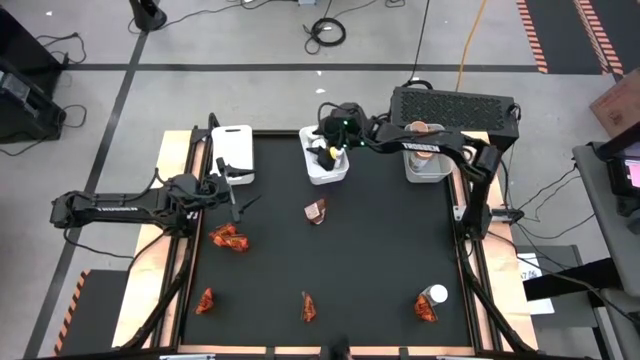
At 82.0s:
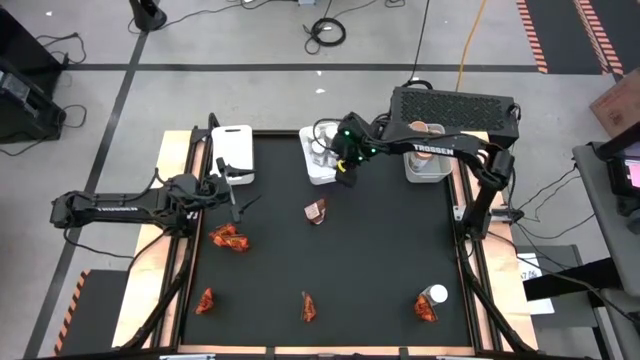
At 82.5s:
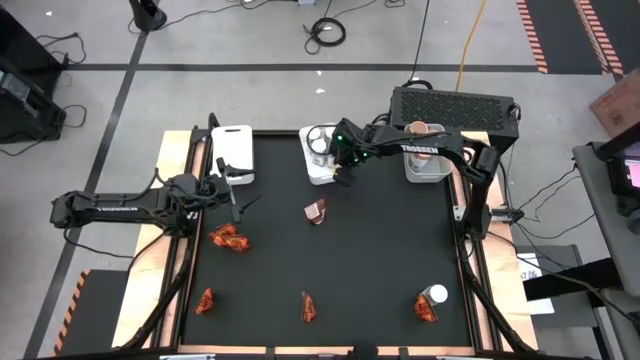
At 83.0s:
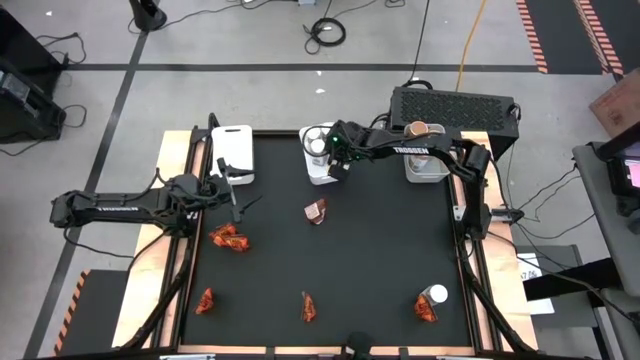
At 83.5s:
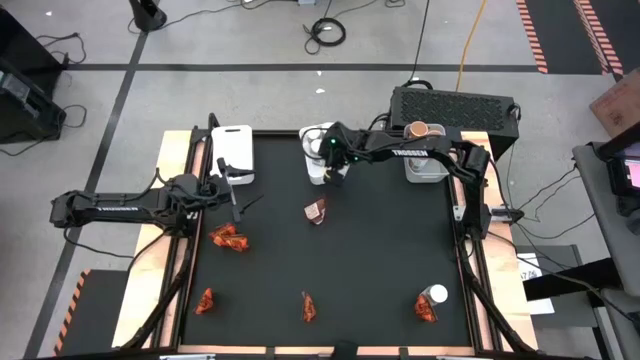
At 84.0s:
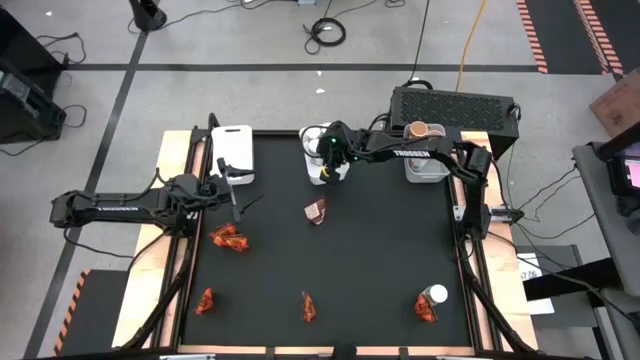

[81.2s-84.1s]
Task: Sort spices by type
Adjust the white seasoning bottles

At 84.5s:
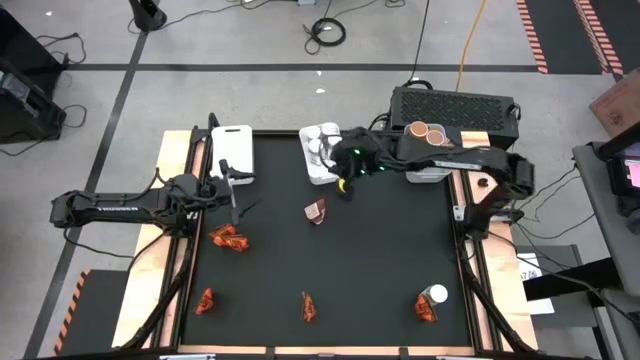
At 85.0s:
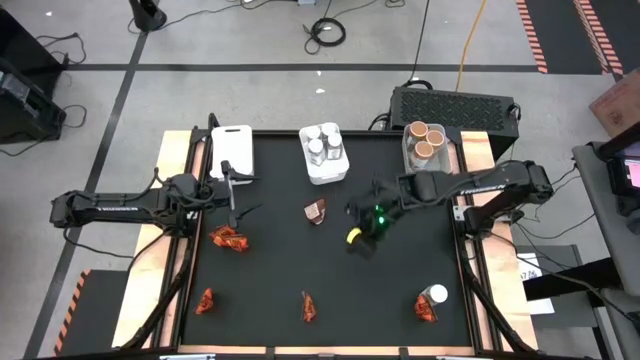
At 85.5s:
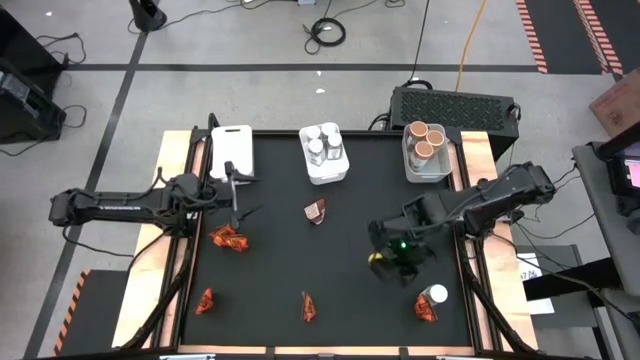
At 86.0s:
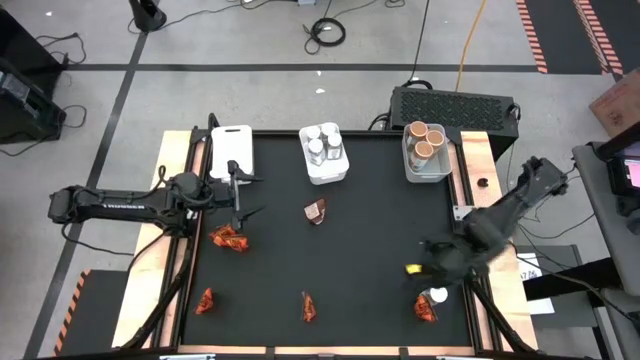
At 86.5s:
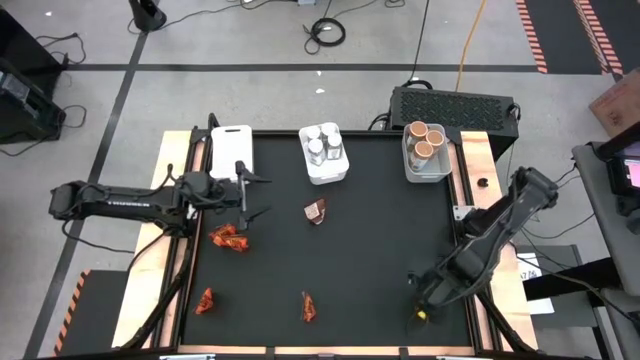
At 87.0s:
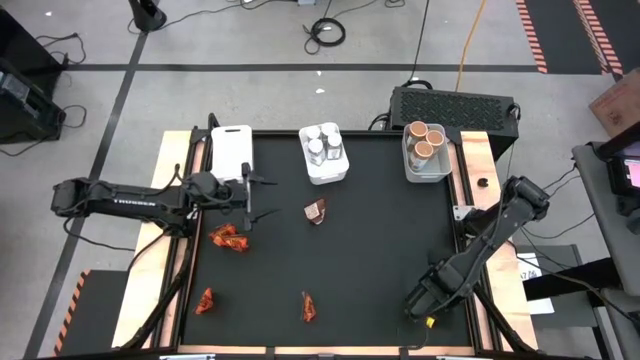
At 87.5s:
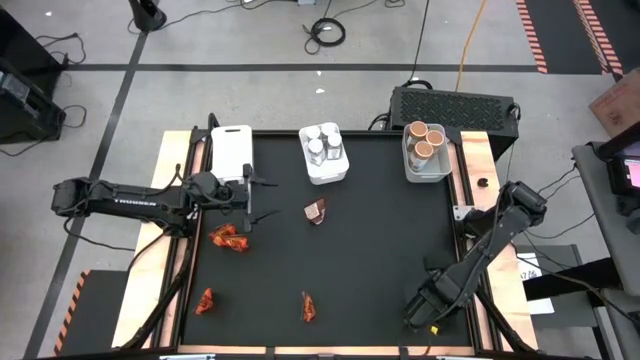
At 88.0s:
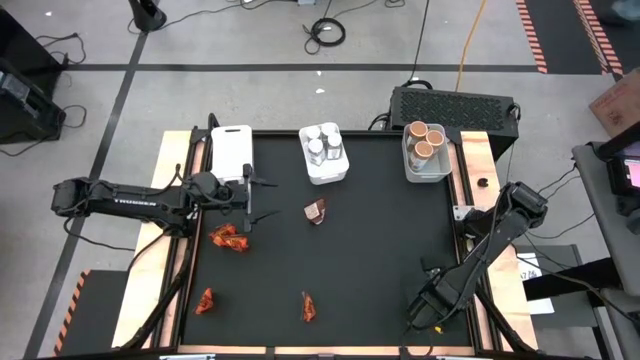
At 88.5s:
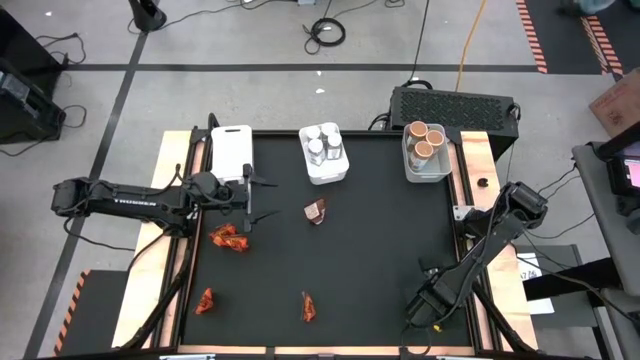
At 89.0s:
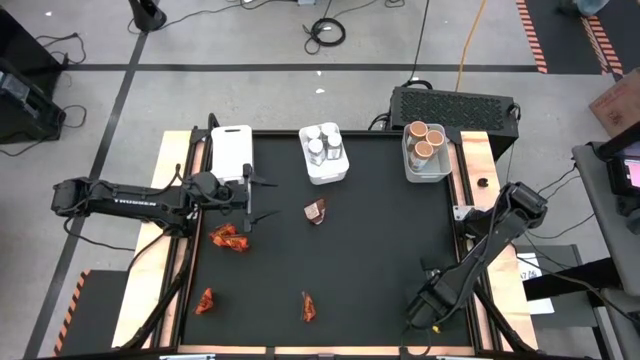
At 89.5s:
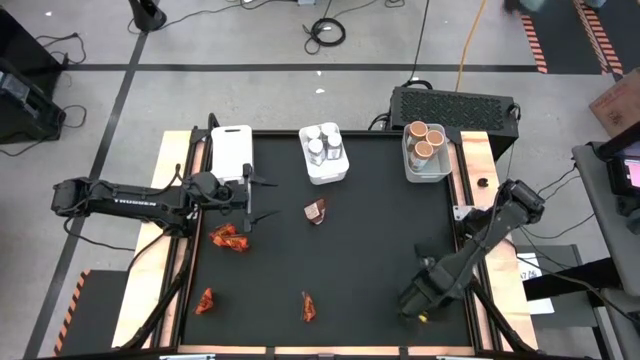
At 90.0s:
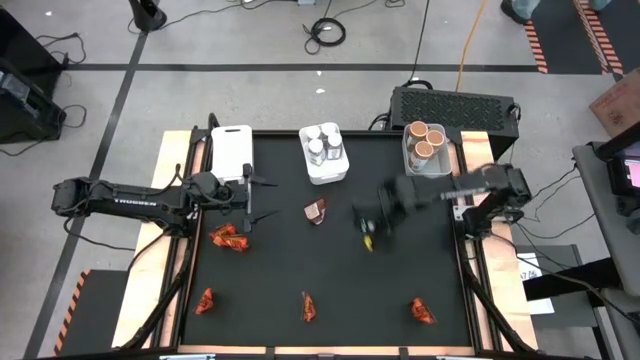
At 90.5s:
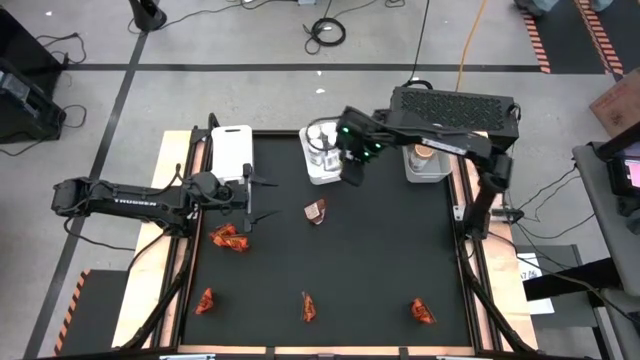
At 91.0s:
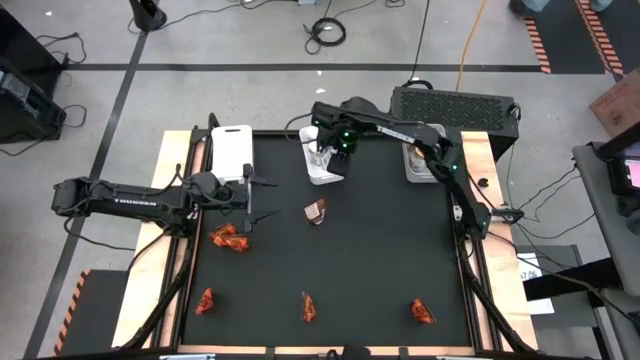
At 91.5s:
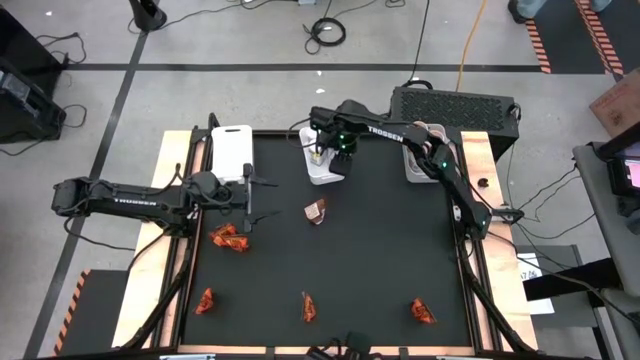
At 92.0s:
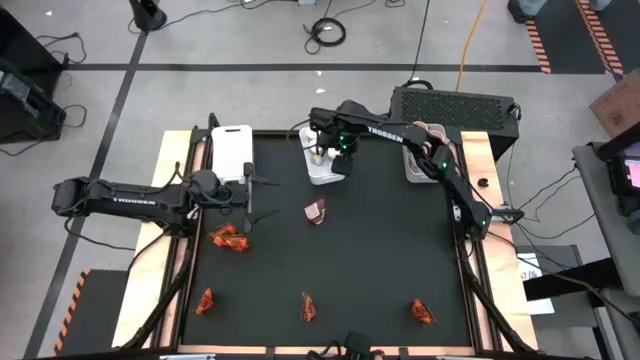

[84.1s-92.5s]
Put the white seasoning bottle into the right white bin

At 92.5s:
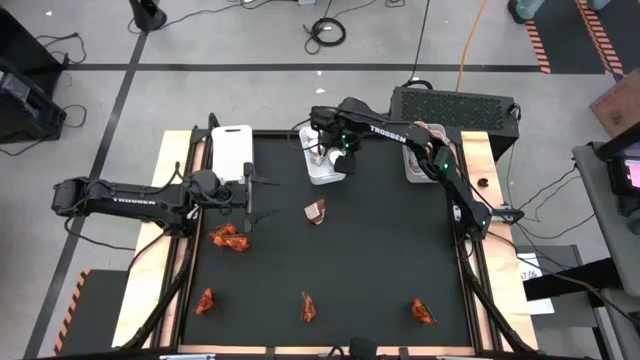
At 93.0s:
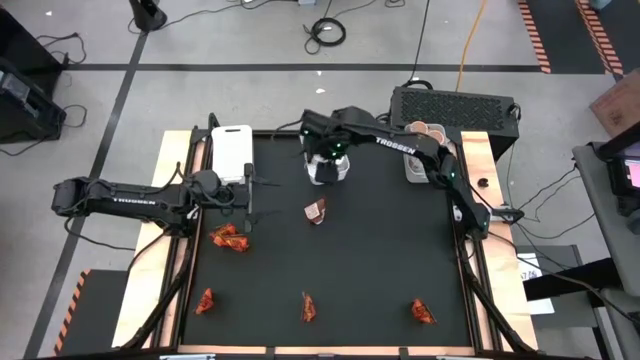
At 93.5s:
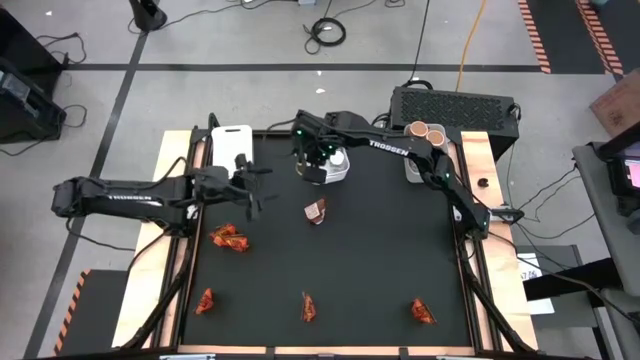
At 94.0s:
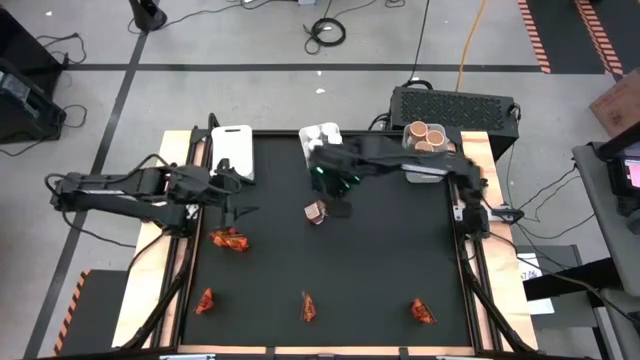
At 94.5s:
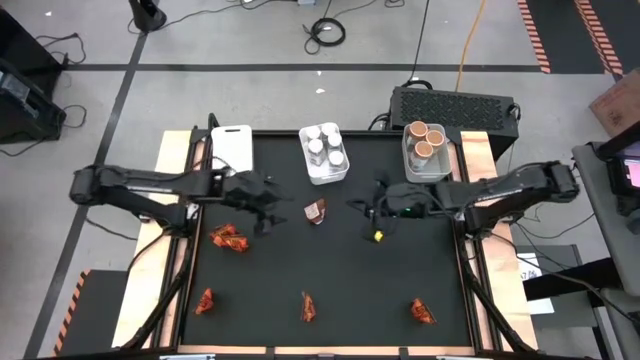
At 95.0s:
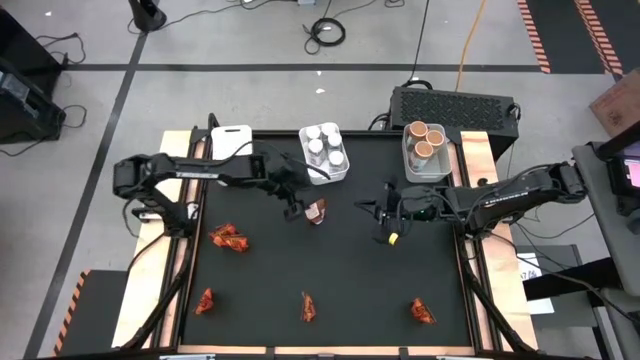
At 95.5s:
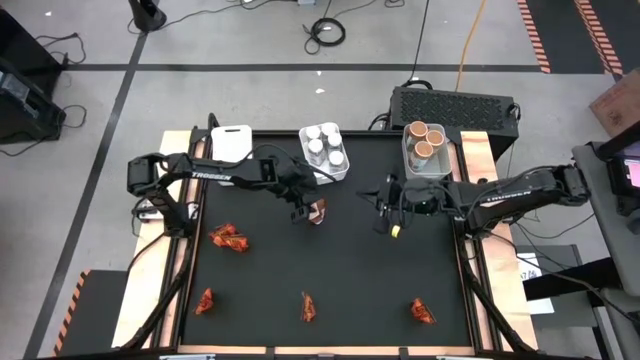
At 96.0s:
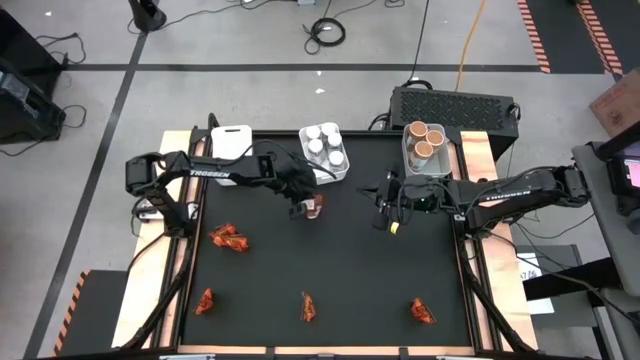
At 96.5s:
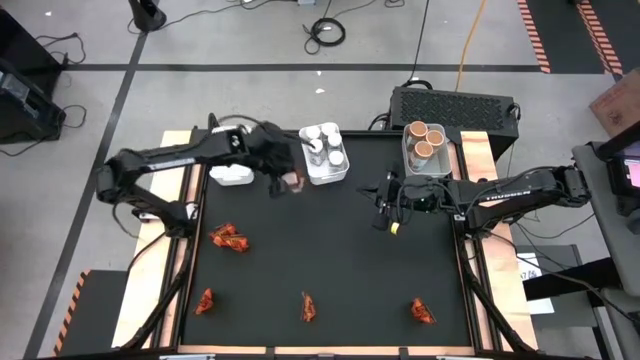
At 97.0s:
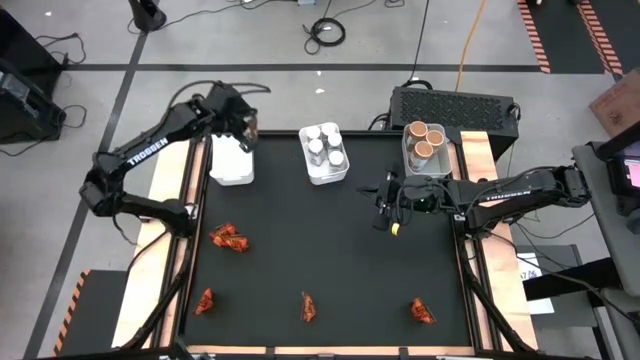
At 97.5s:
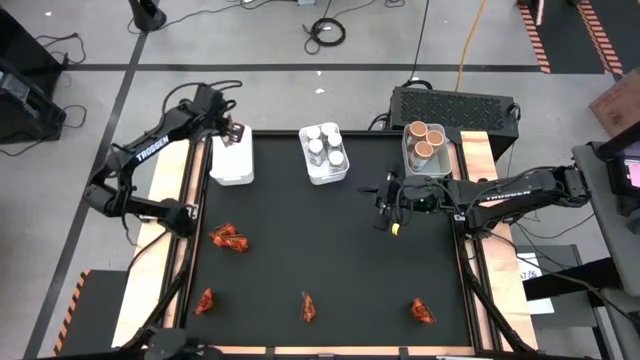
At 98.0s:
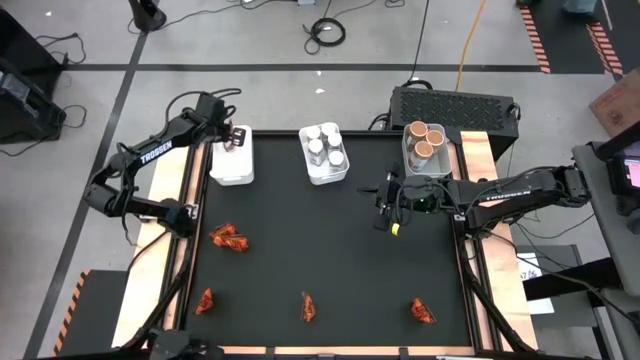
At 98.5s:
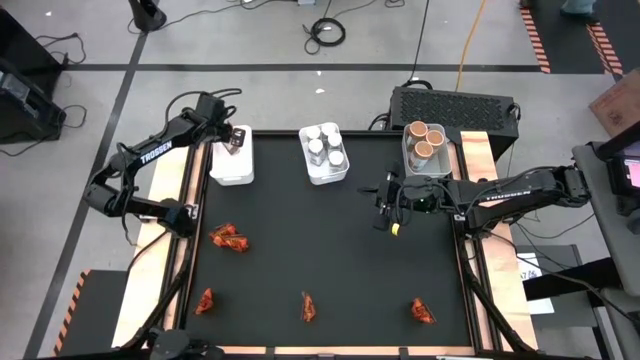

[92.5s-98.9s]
Put the orange seasoning pack into the left white bin

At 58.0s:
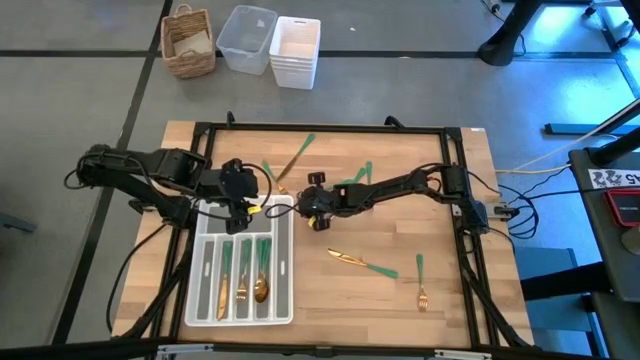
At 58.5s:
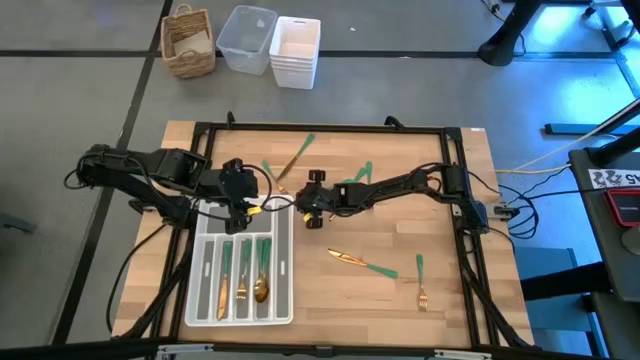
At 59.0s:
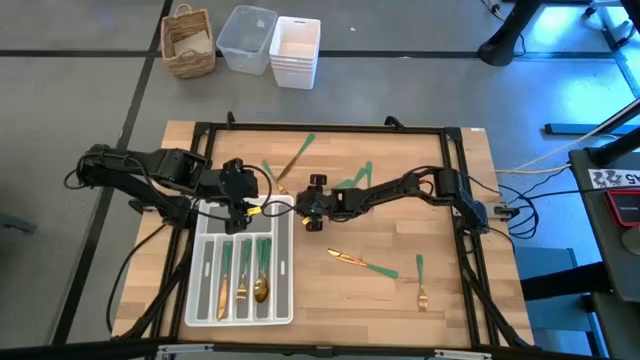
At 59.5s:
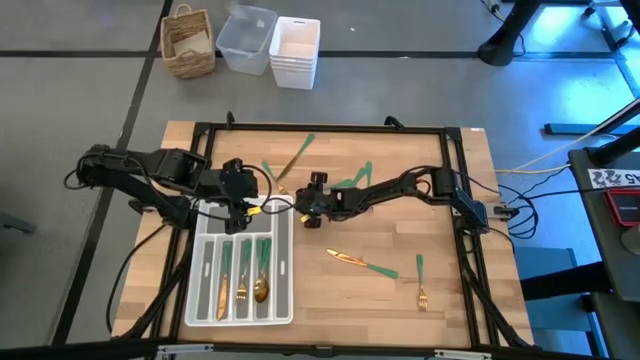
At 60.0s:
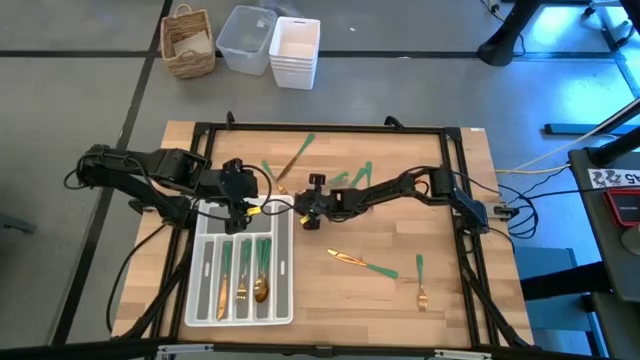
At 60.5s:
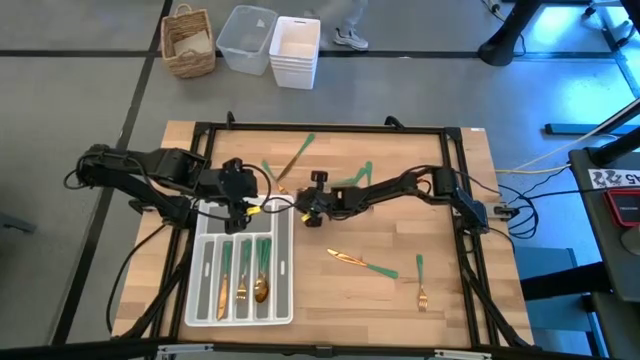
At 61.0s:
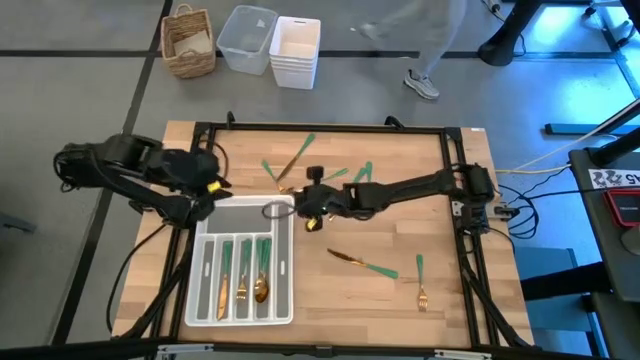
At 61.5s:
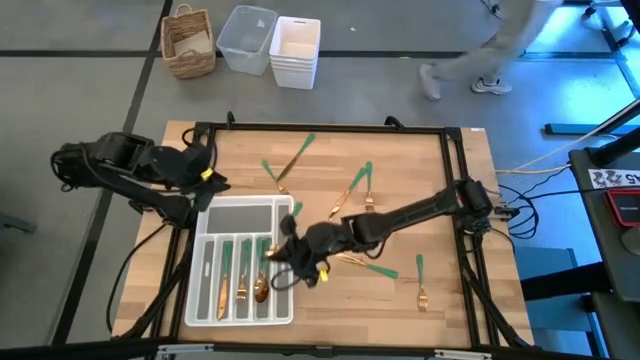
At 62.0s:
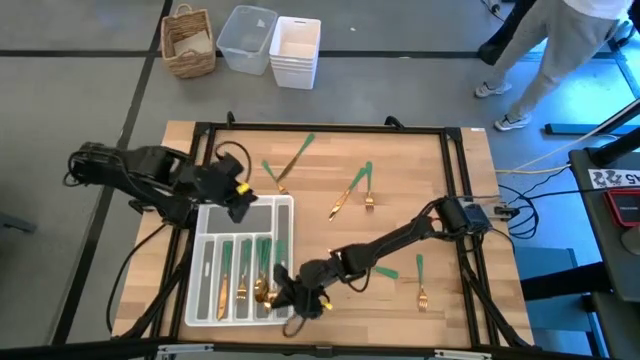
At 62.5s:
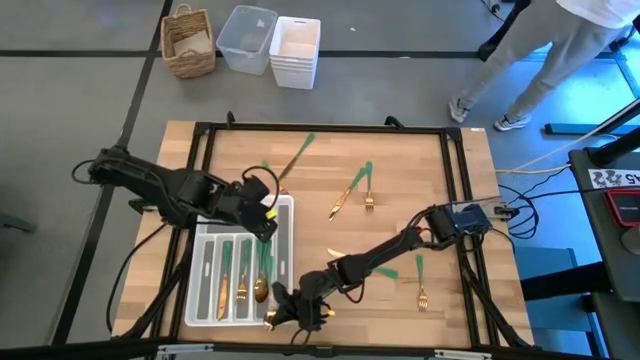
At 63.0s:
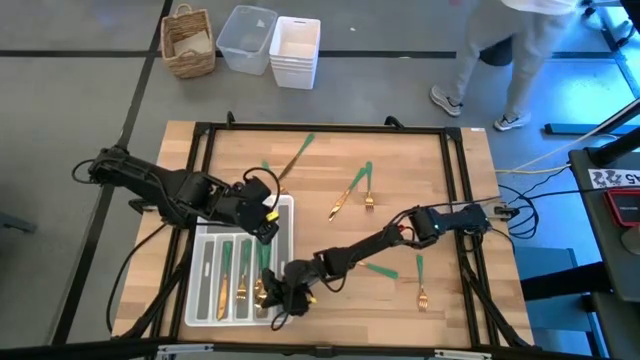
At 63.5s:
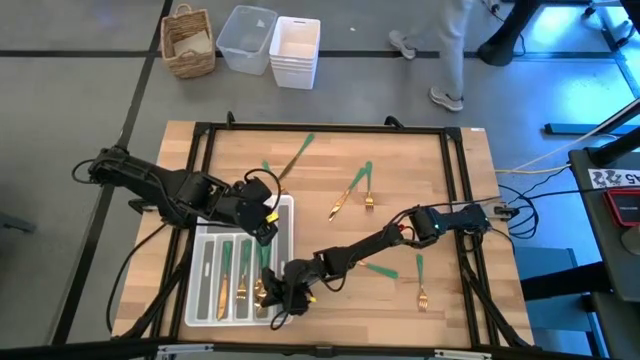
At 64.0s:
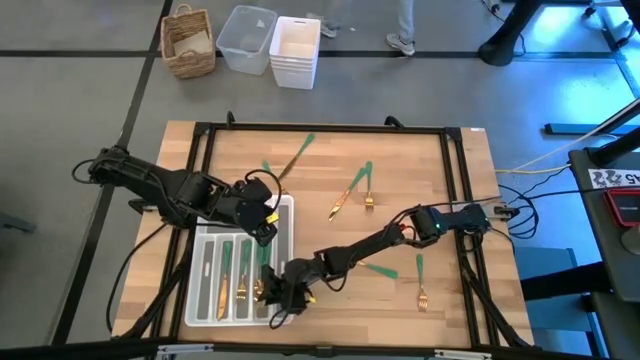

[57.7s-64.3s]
Task: Sort silverware
Put the green spoon on the silverware tray
